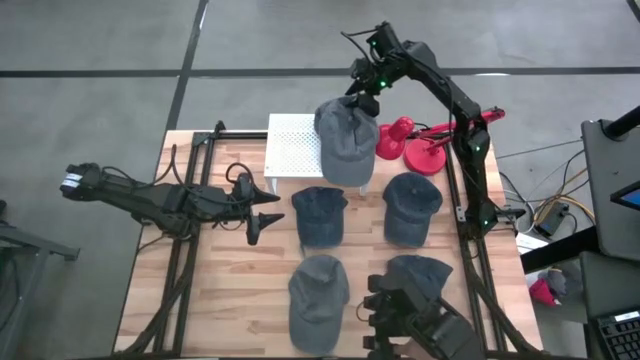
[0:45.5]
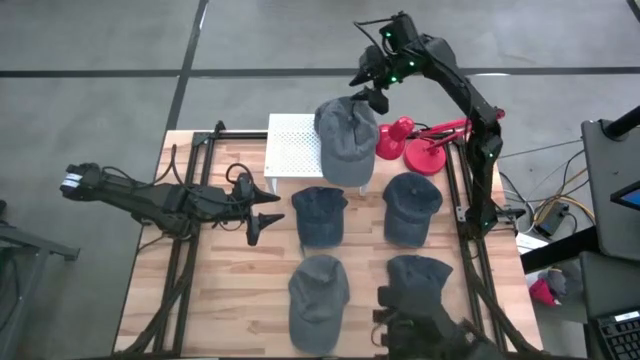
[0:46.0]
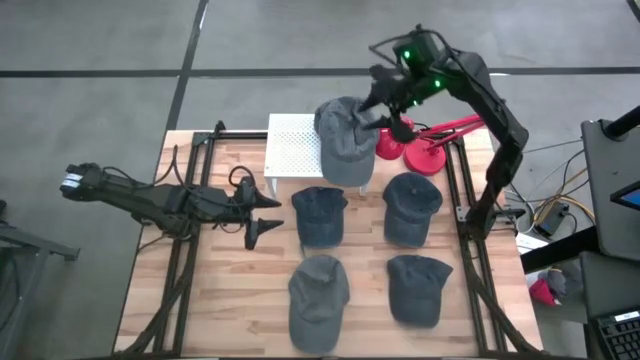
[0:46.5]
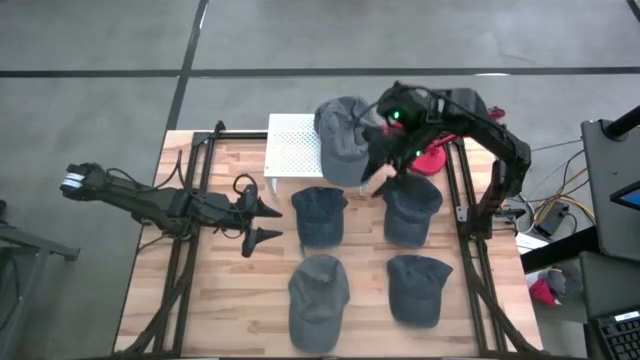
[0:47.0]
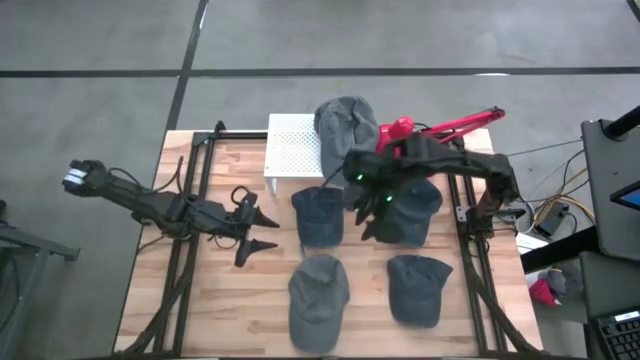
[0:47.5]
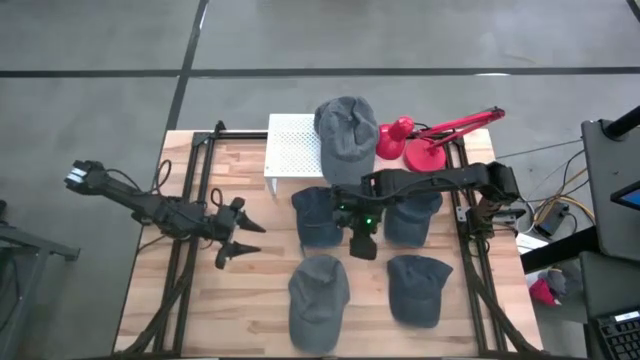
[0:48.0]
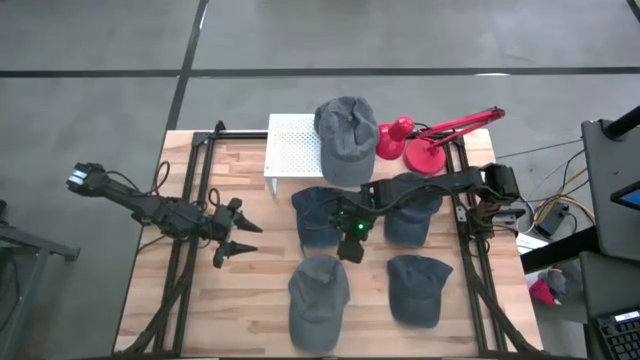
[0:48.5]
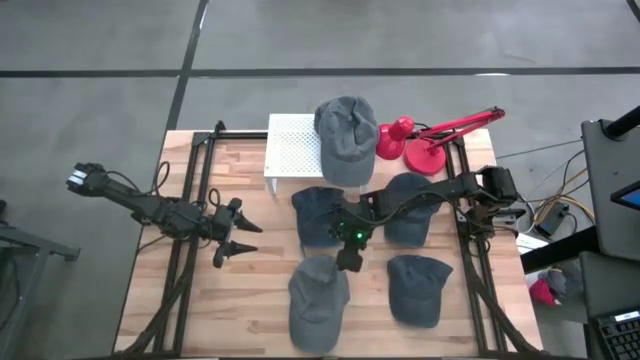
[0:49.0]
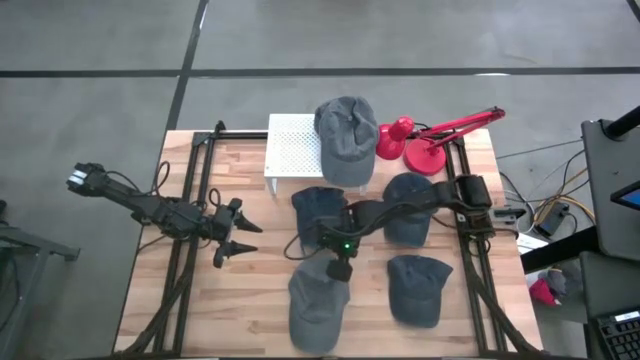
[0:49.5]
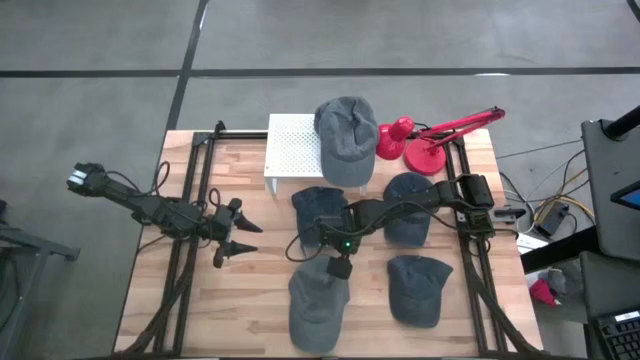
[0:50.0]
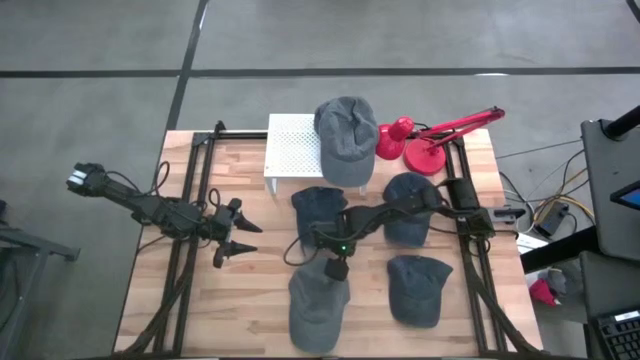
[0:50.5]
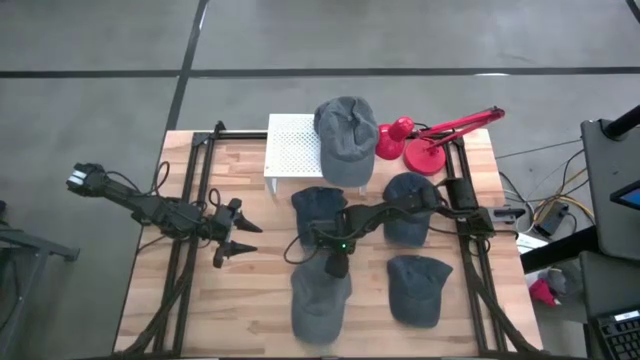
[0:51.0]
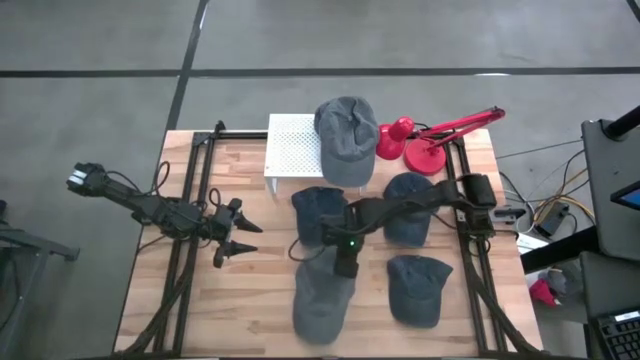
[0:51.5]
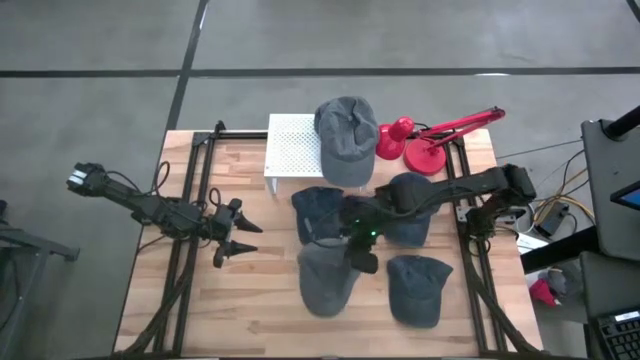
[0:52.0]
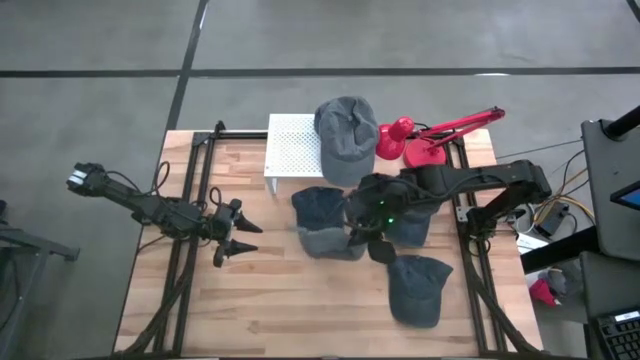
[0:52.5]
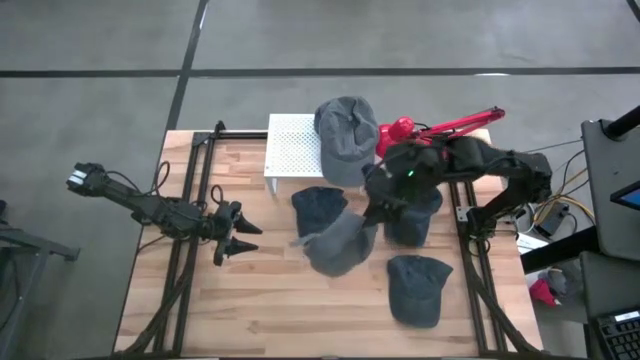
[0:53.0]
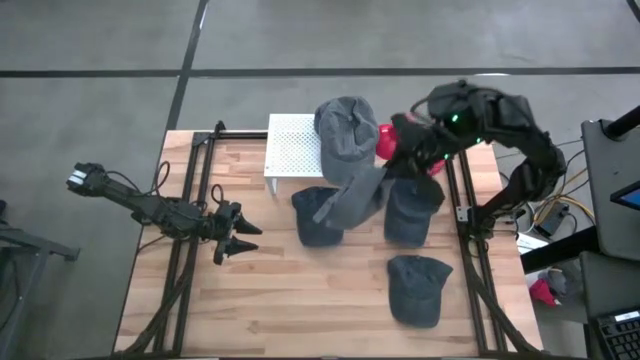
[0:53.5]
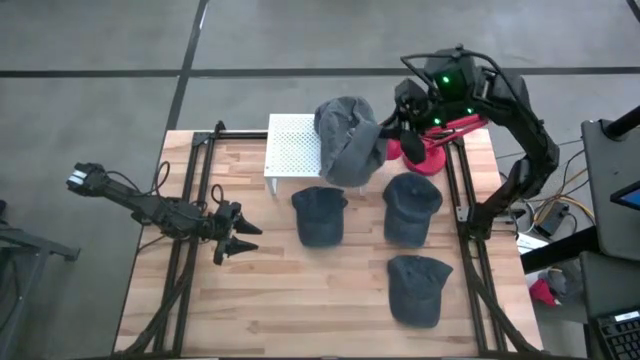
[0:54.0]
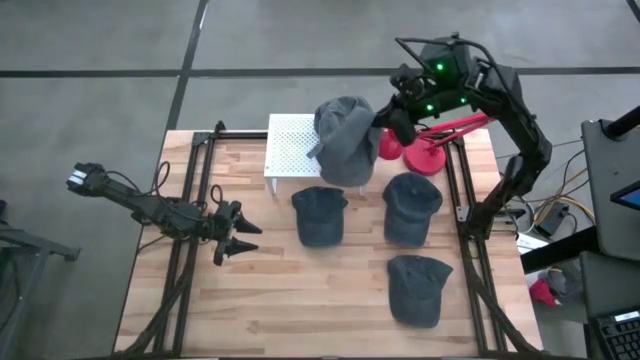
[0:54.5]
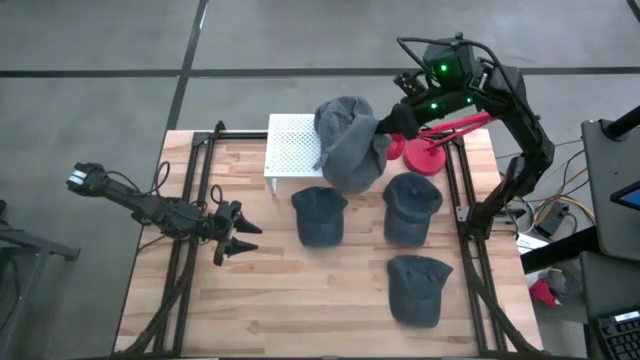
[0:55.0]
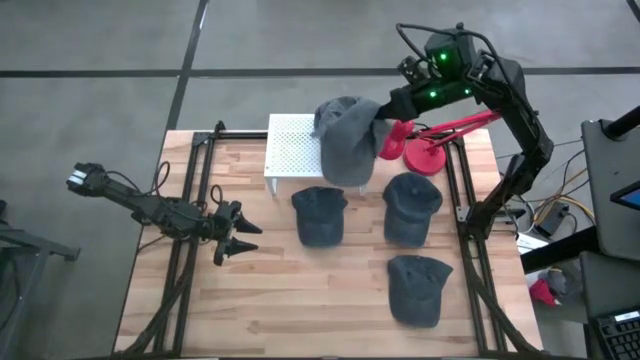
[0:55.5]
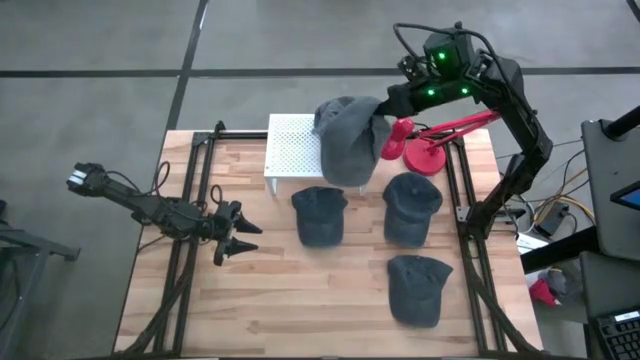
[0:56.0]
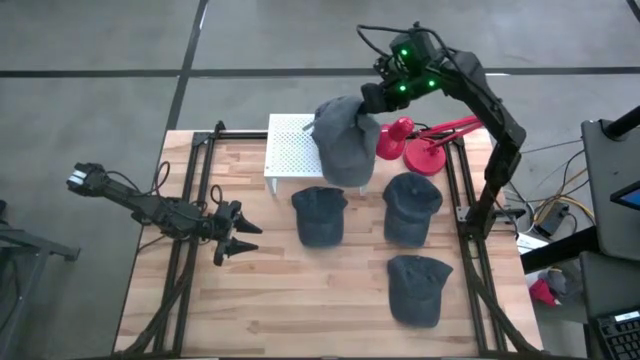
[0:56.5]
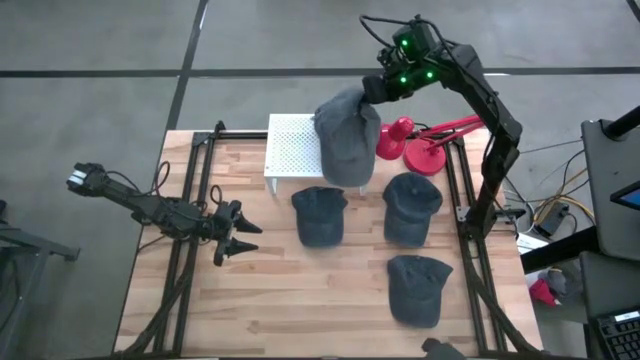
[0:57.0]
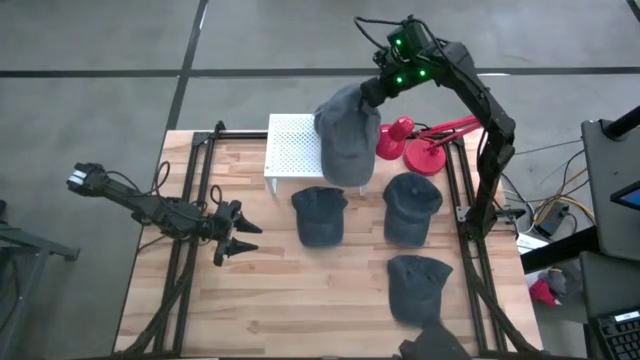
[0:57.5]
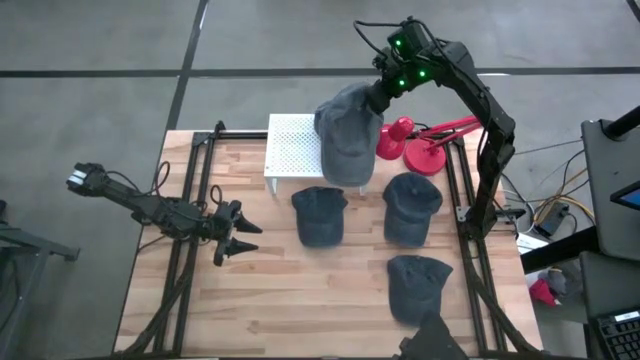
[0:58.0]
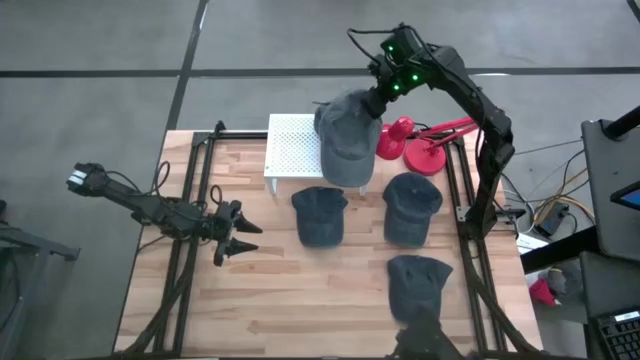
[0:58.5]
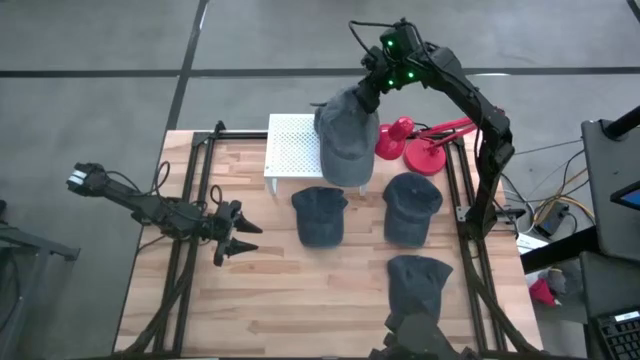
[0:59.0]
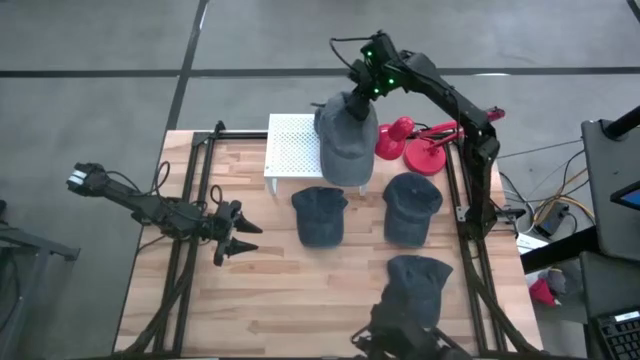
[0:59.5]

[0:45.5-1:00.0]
Task: Pick & Place hat
Stack the gray cap on the gray cap on the shelf

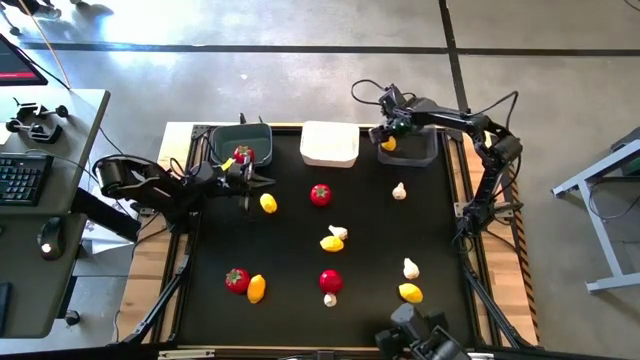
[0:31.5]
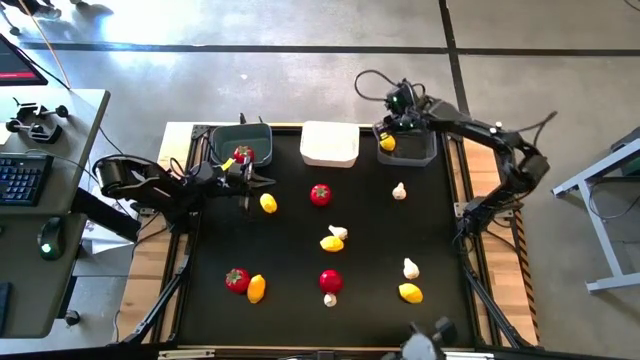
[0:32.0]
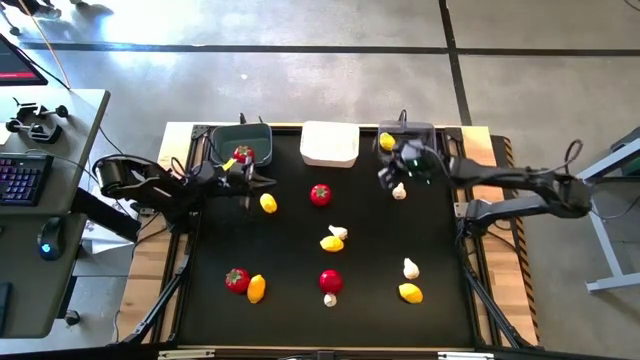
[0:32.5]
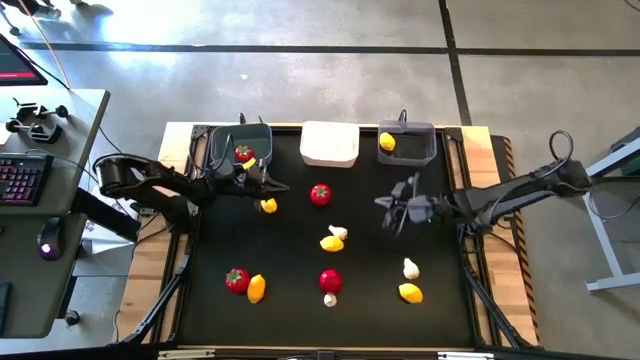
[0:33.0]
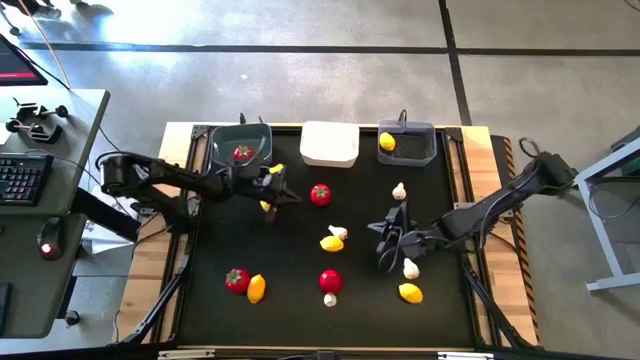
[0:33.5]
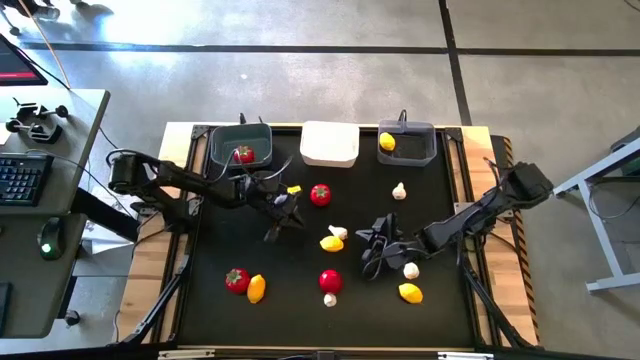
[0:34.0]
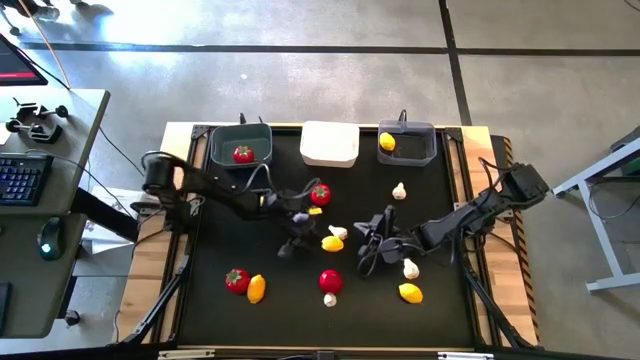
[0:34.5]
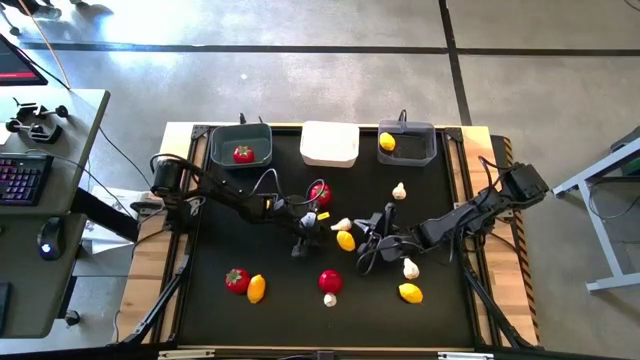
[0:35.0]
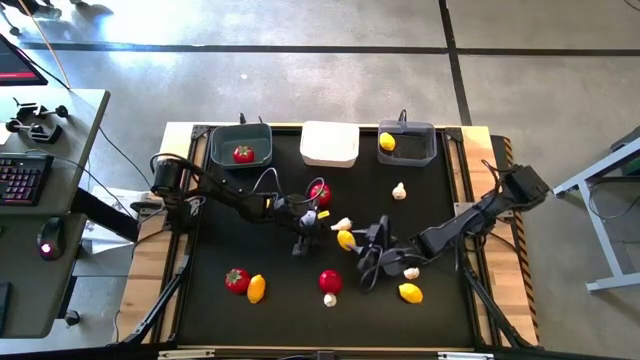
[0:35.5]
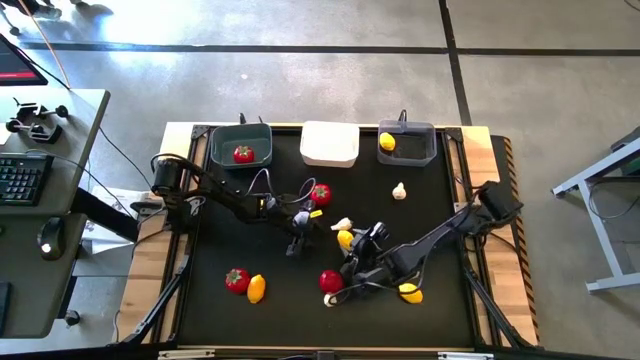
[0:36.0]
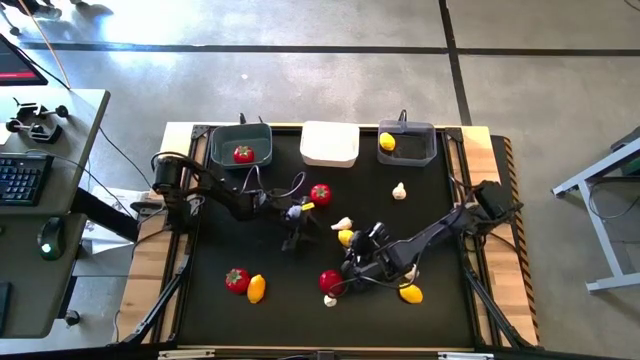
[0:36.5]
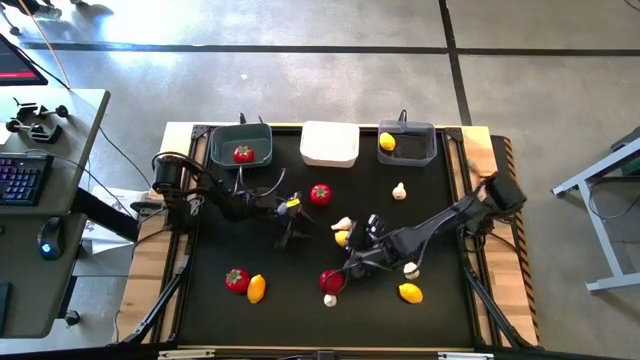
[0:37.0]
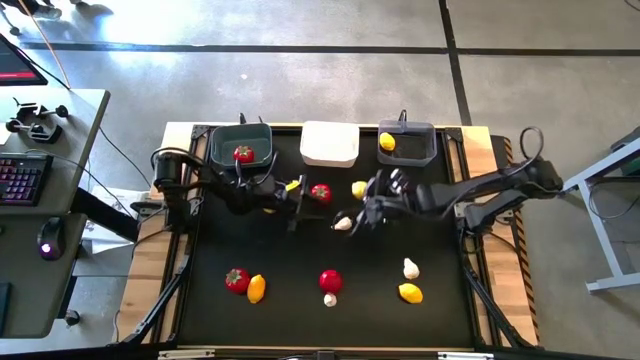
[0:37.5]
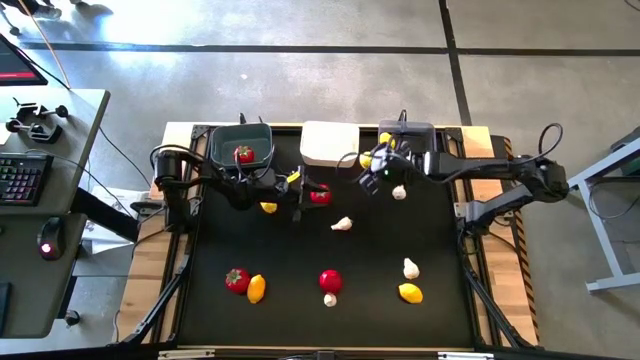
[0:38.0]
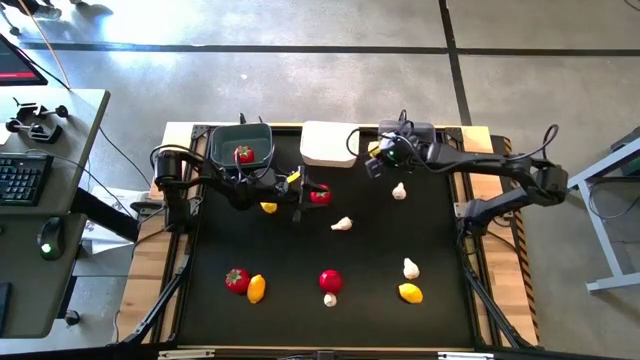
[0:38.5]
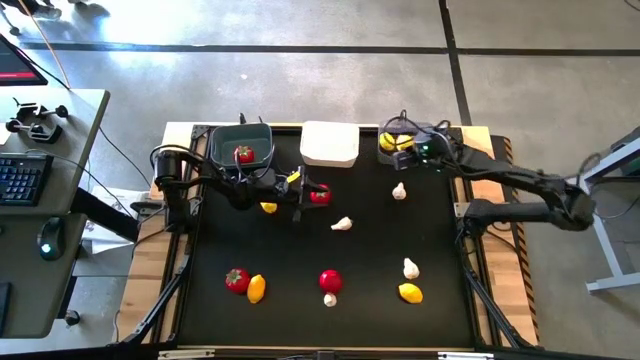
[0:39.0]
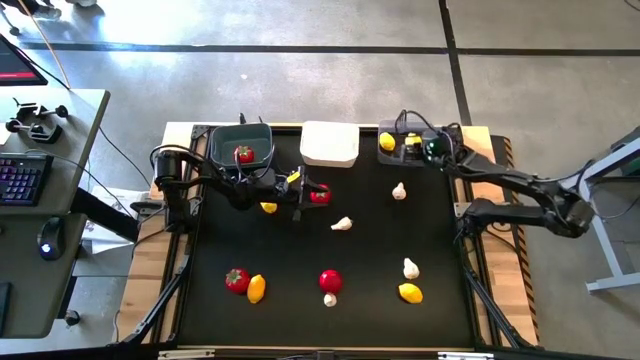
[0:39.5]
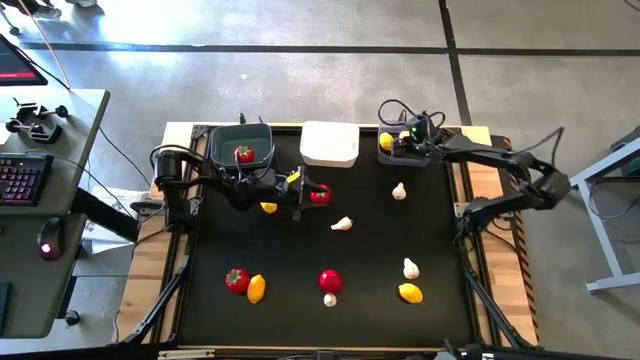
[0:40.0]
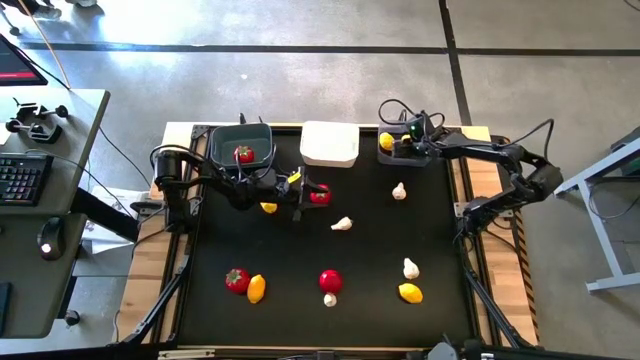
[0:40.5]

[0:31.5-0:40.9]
Task: Sort produce into baskets
Put the center yellow lemon into the transparent bin
